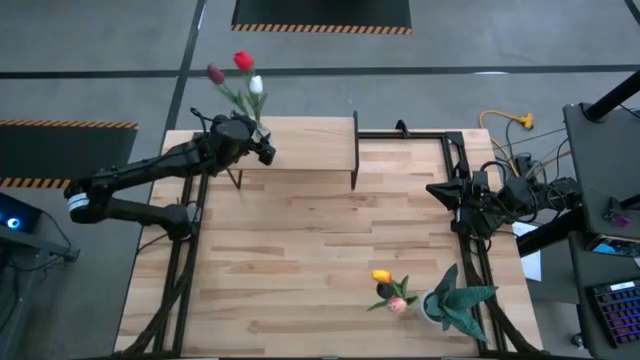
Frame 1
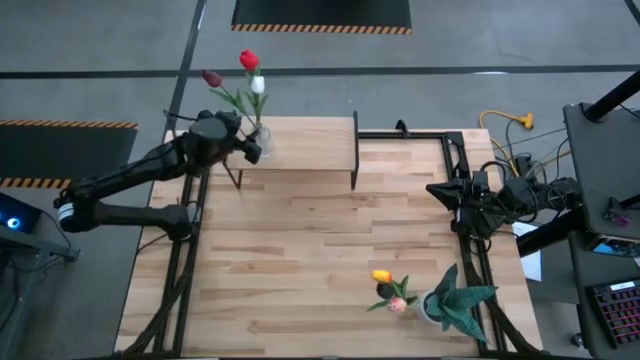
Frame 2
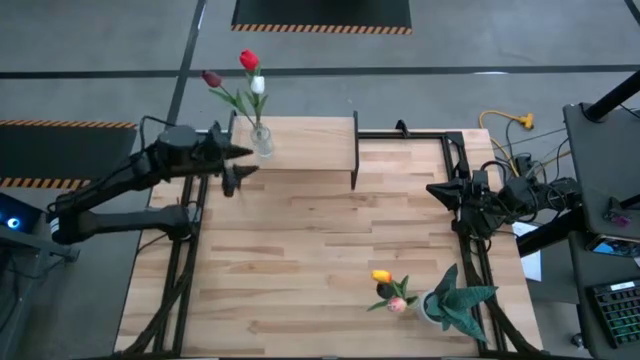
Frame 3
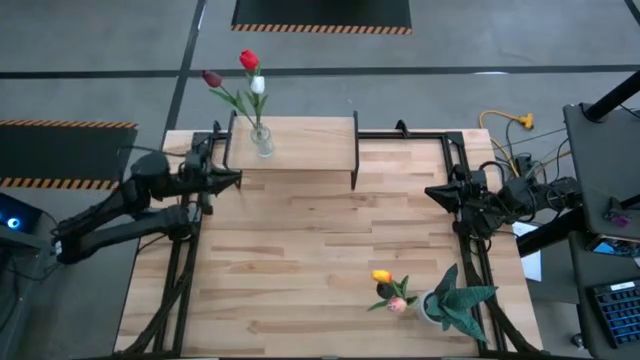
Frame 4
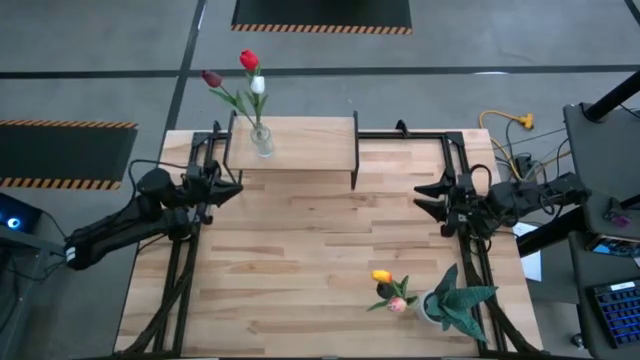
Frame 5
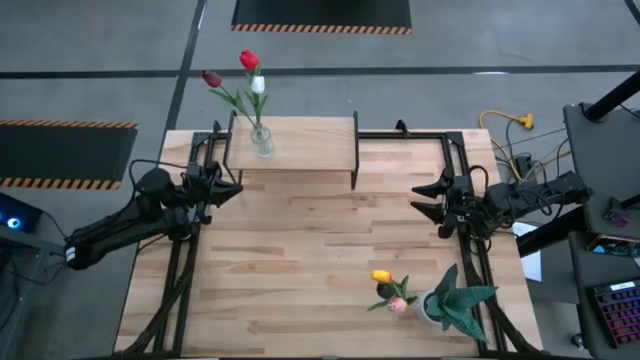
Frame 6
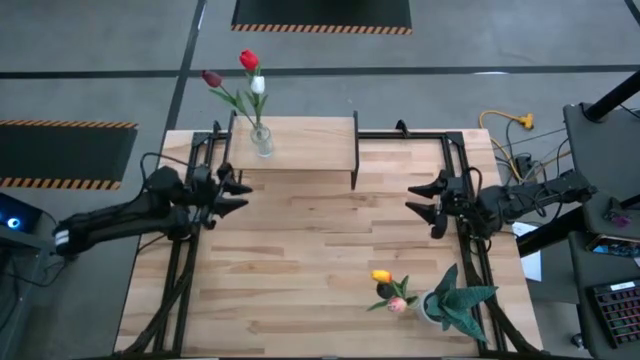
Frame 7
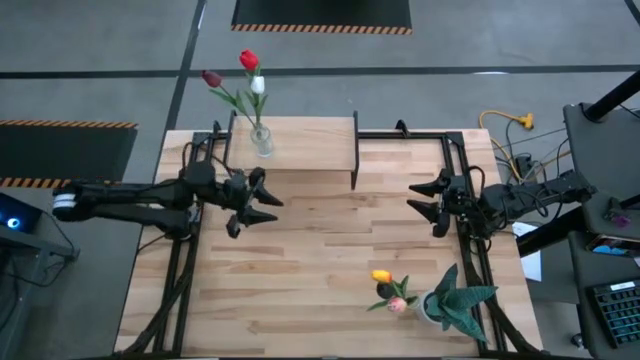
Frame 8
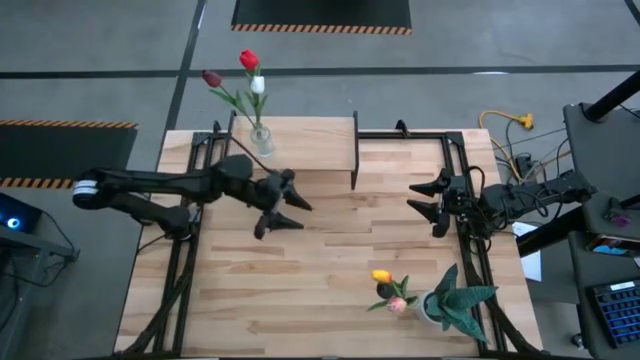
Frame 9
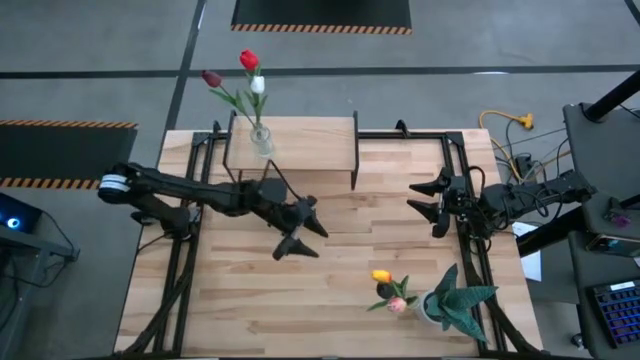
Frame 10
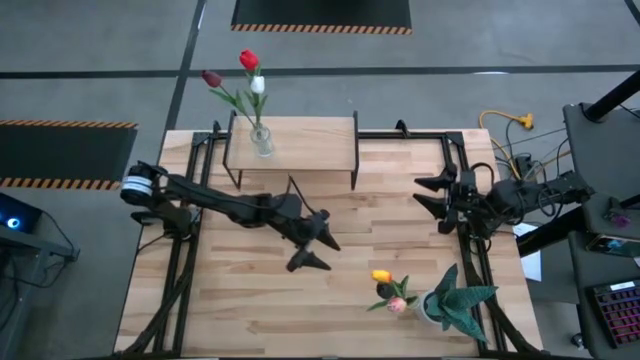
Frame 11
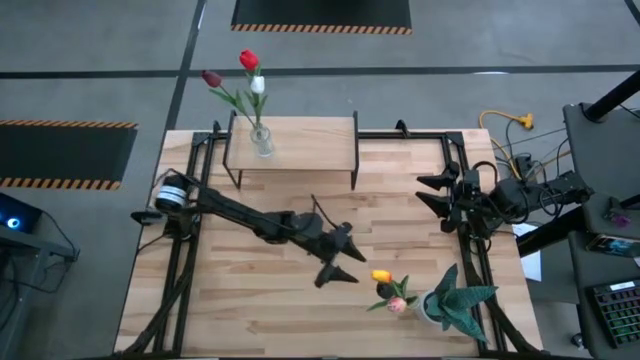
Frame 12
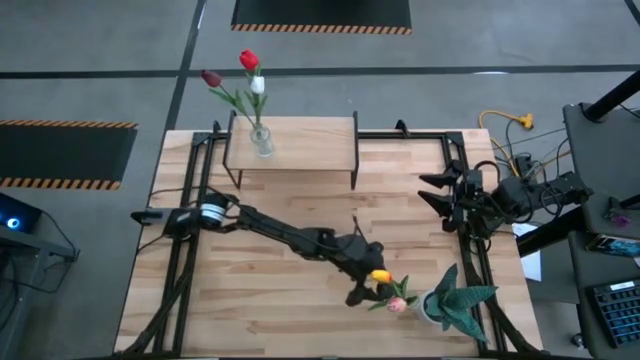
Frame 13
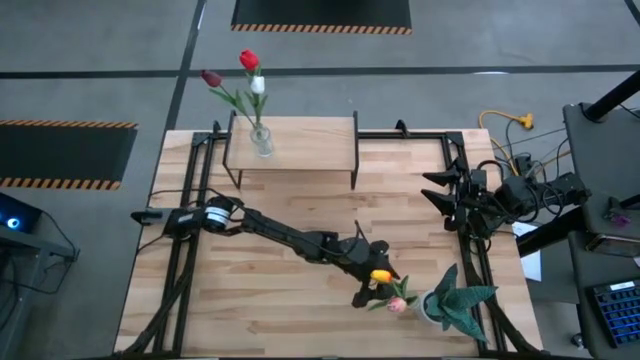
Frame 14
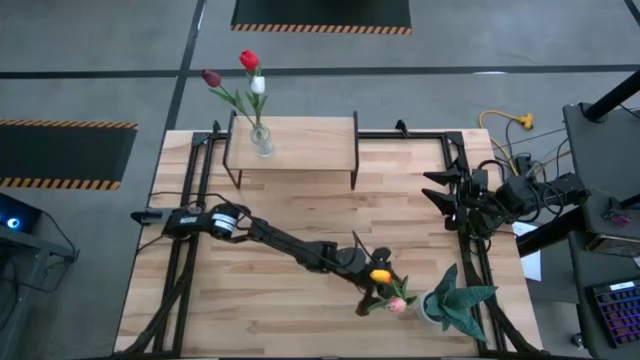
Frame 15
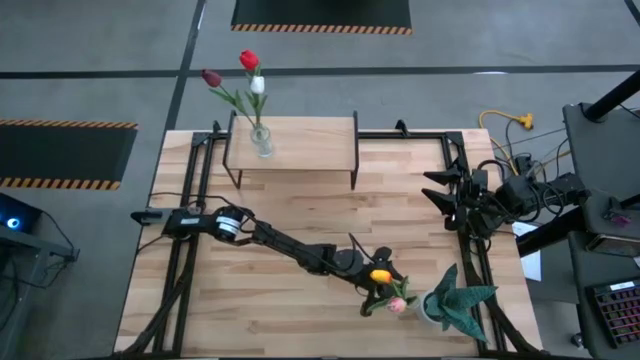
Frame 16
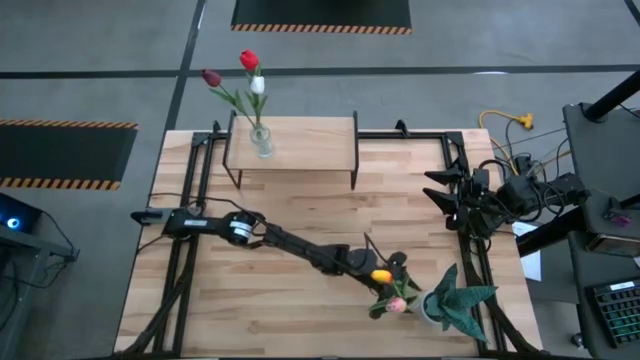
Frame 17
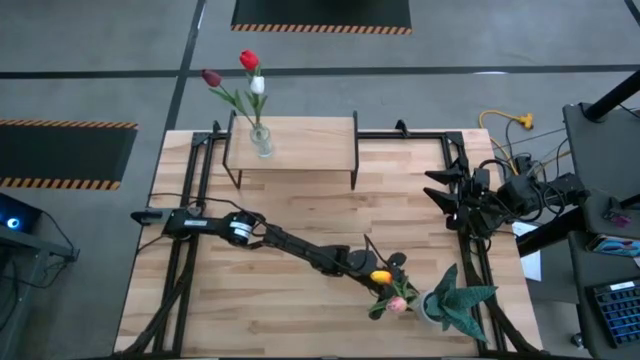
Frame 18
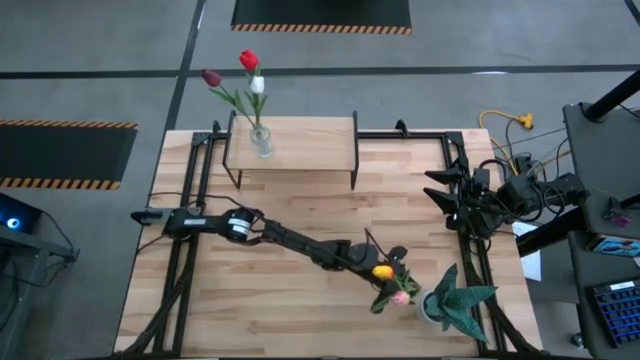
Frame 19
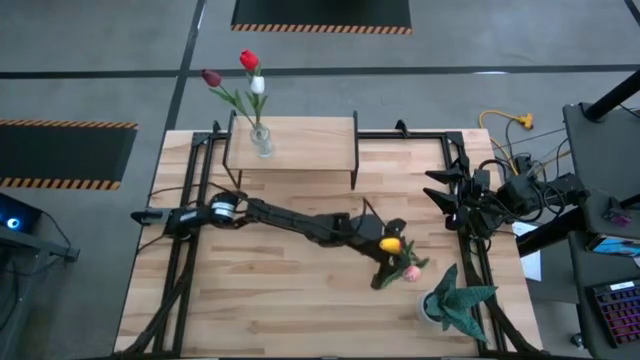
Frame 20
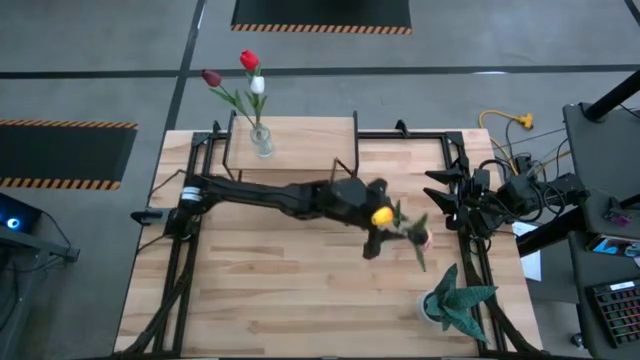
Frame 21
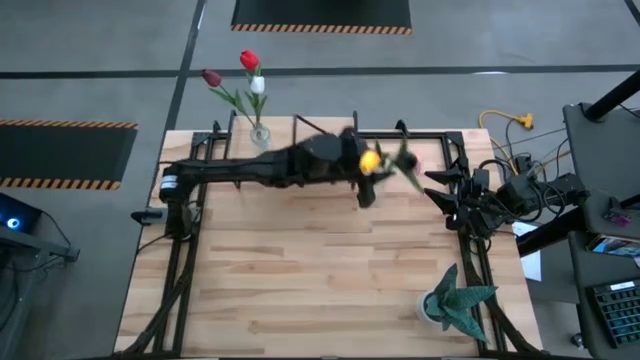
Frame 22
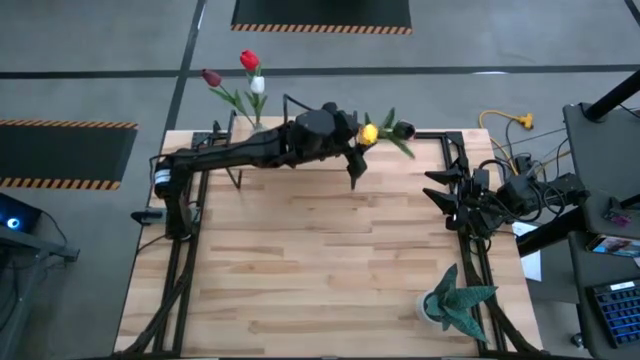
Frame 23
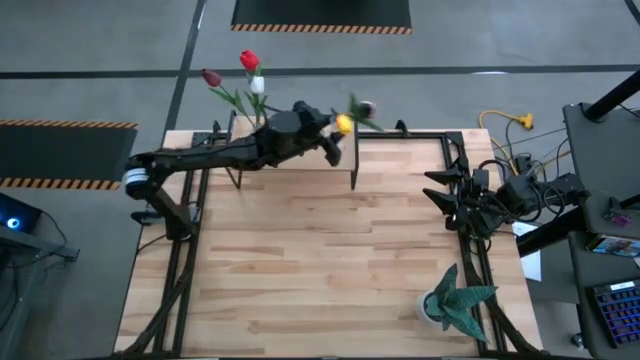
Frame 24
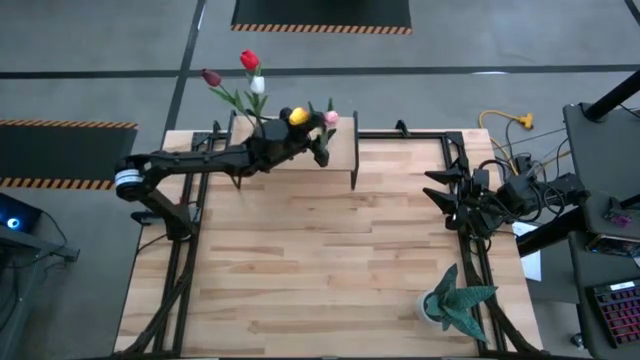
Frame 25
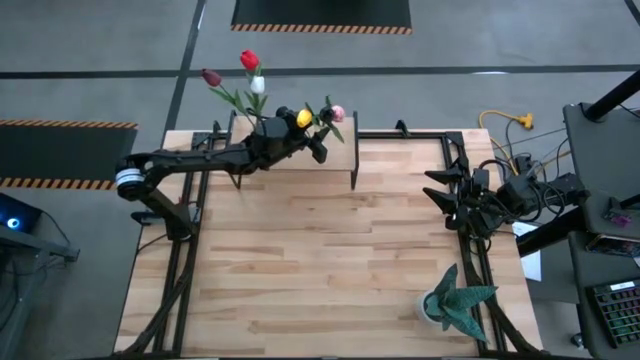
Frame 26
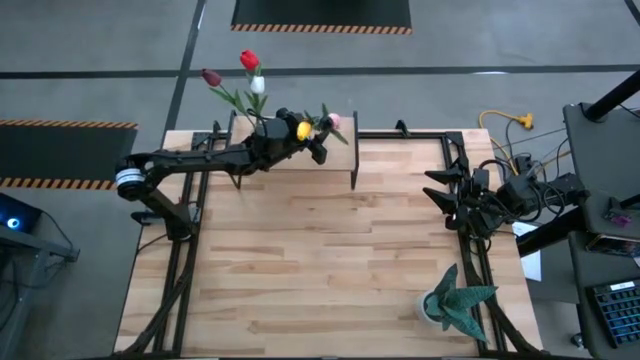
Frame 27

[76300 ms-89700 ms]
Task: Pick and place flowers into a vace then onto a shelf
Put the transparent vase on the shelf

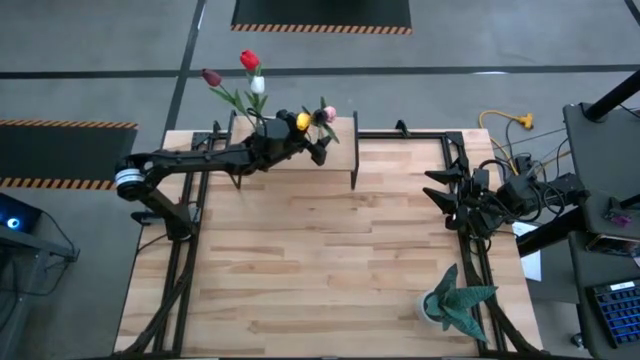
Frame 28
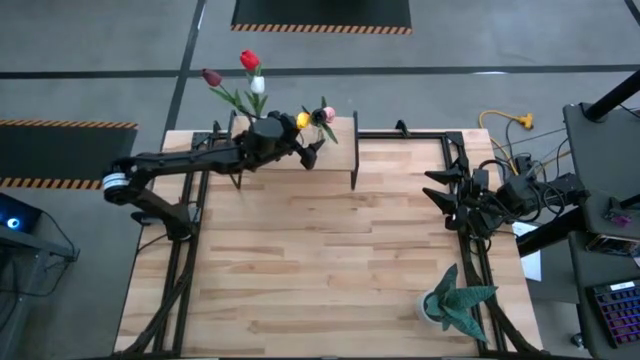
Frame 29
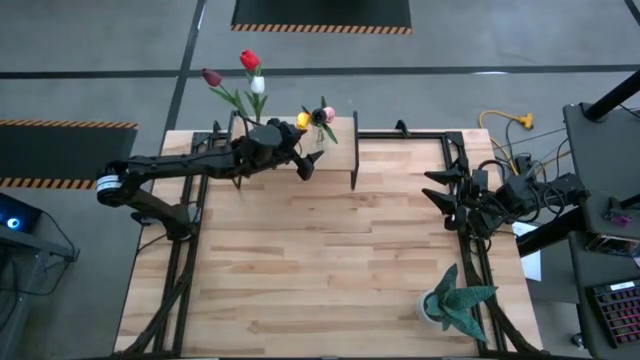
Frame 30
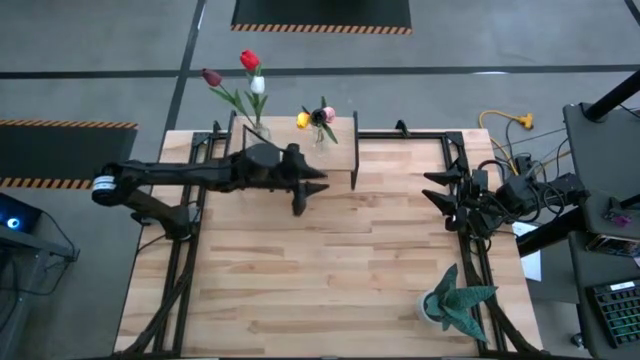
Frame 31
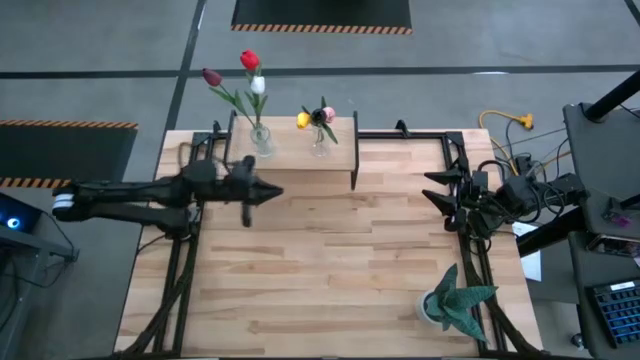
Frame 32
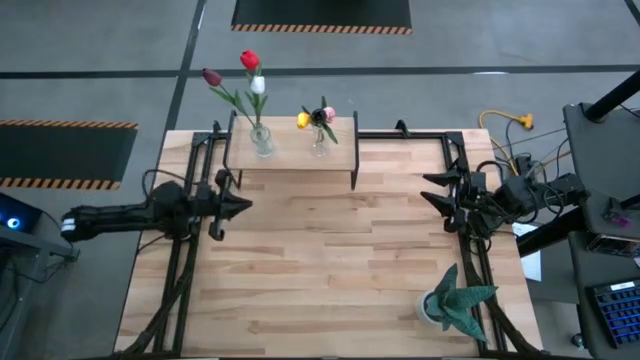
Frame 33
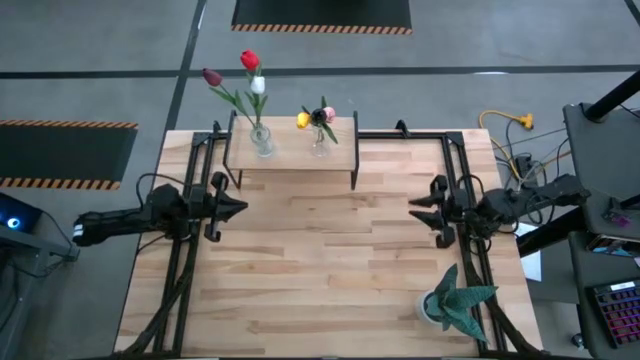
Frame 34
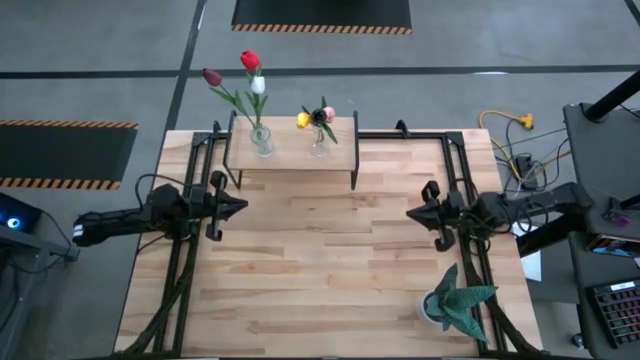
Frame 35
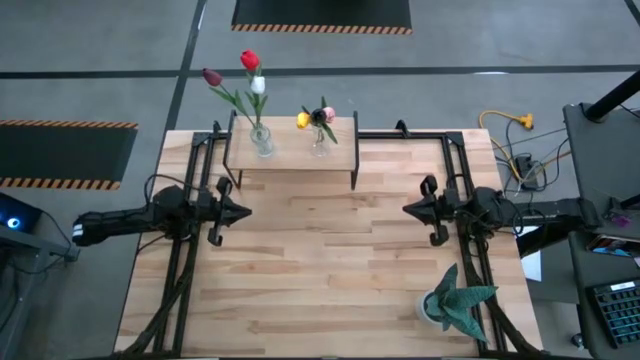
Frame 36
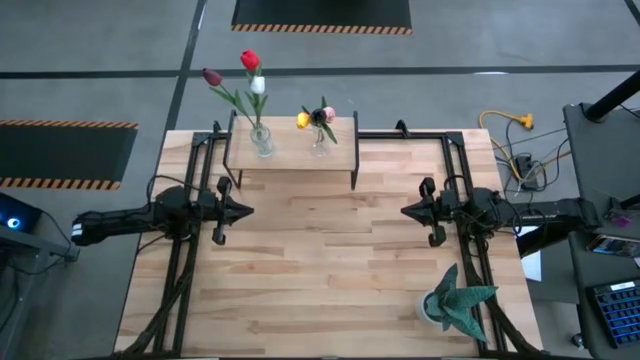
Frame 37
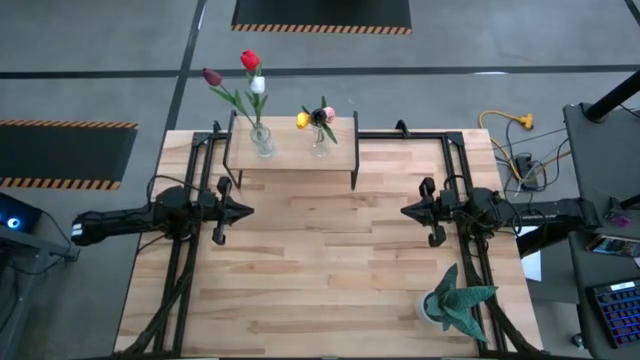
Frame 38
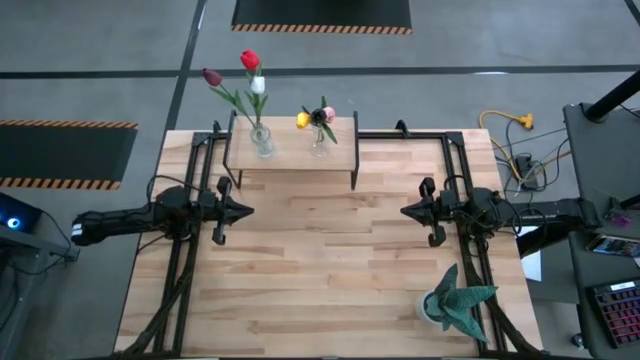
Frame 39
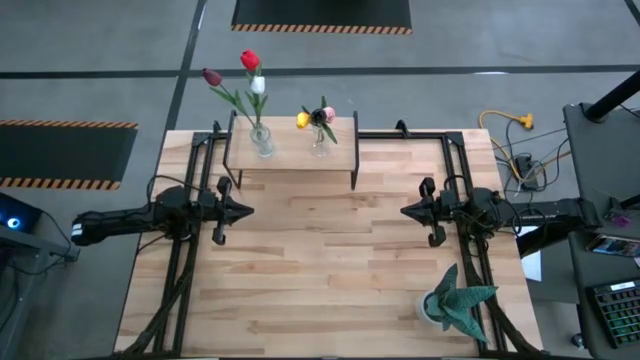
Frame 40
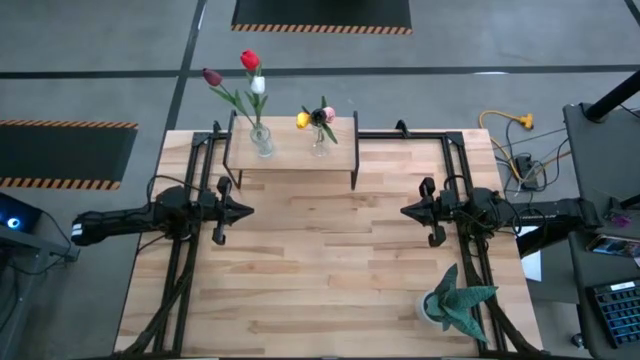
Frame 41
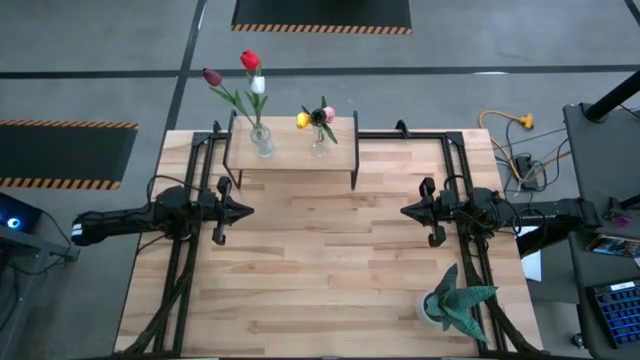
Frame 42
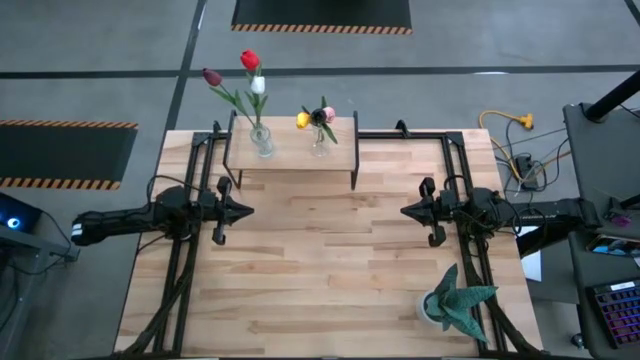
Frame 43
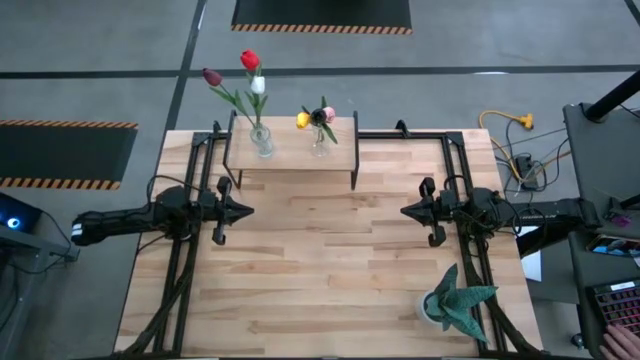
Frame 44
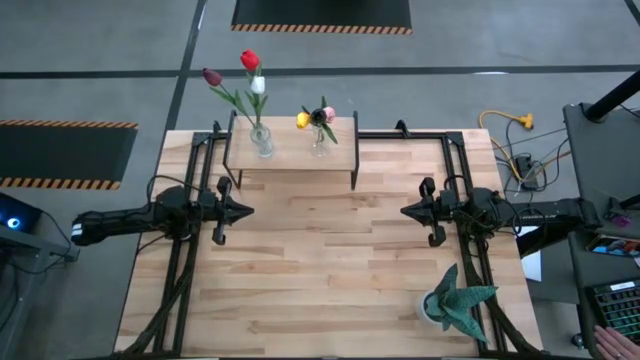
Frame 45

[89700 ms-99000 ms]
Return to Home Position
